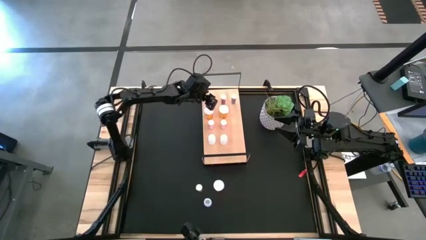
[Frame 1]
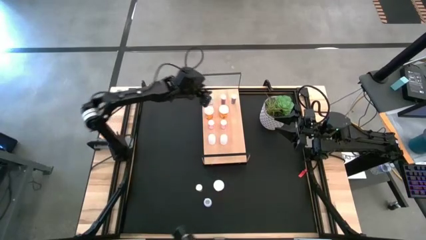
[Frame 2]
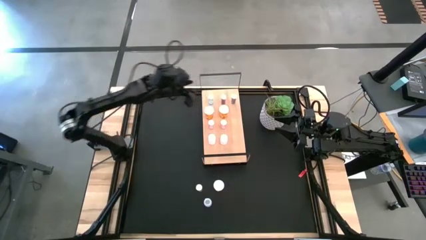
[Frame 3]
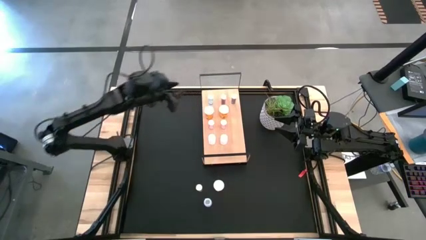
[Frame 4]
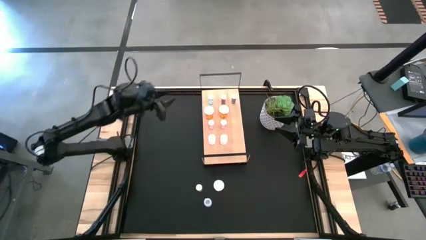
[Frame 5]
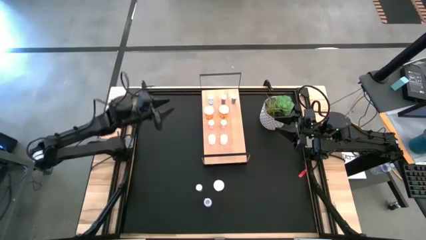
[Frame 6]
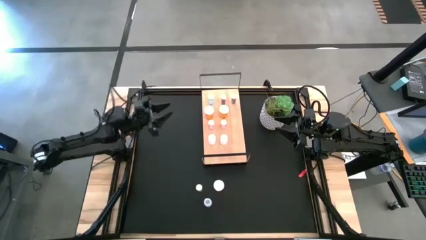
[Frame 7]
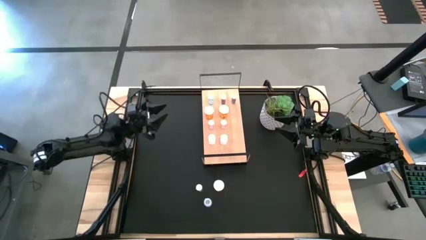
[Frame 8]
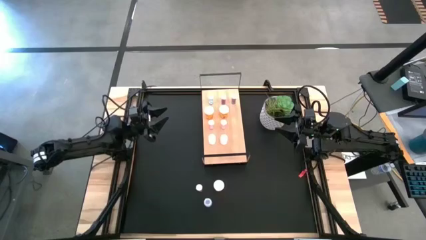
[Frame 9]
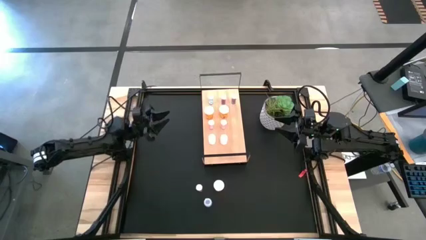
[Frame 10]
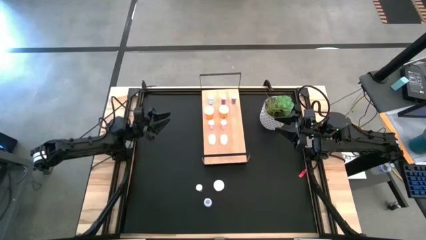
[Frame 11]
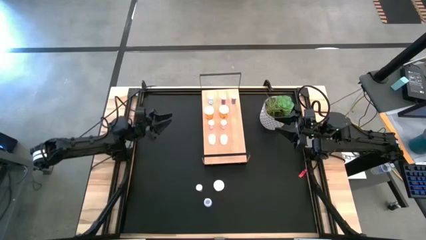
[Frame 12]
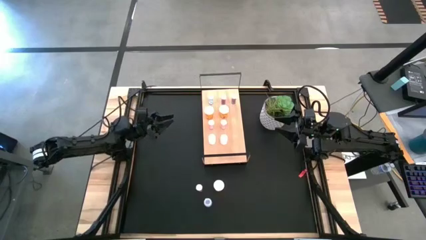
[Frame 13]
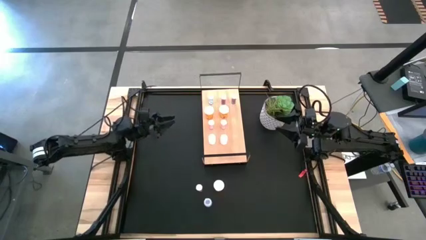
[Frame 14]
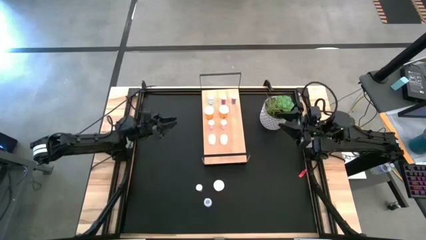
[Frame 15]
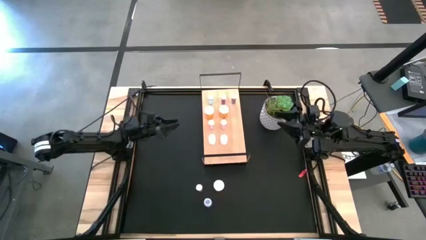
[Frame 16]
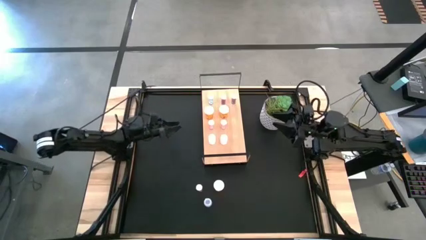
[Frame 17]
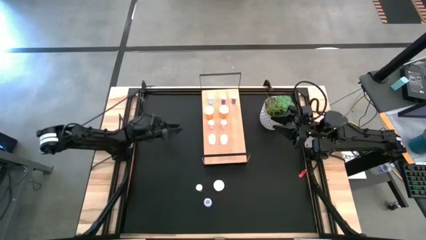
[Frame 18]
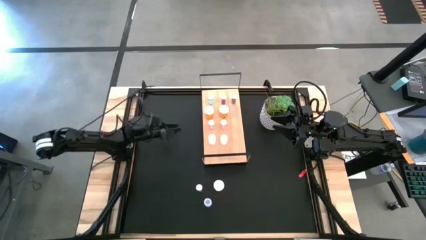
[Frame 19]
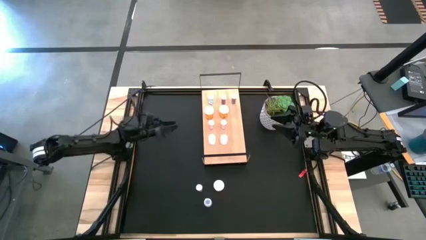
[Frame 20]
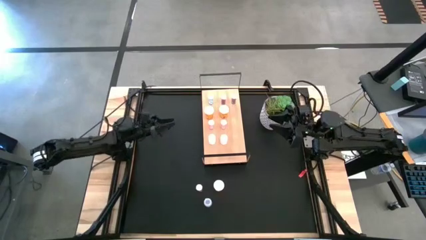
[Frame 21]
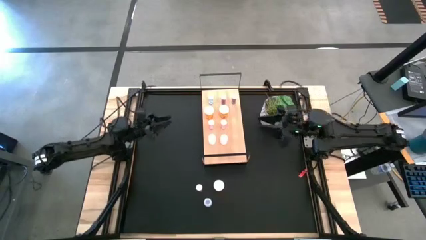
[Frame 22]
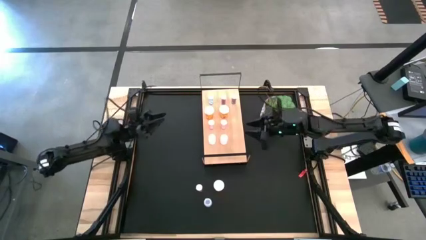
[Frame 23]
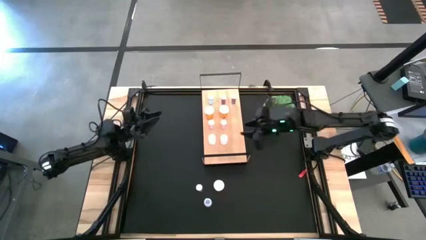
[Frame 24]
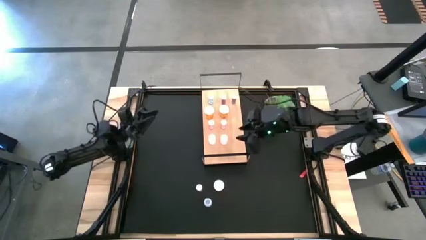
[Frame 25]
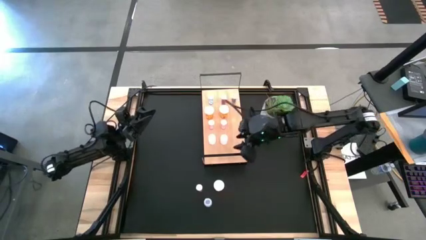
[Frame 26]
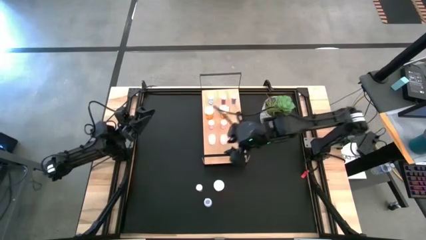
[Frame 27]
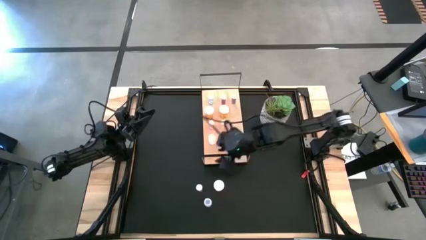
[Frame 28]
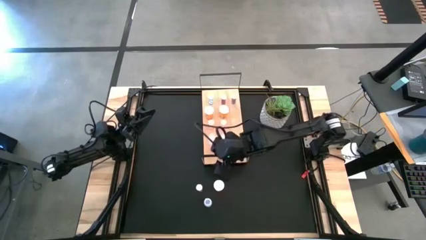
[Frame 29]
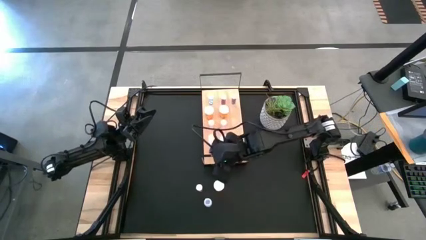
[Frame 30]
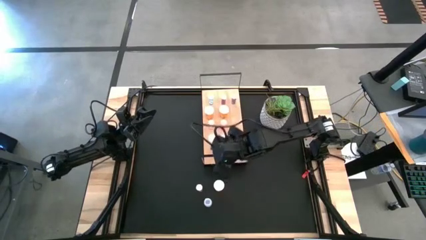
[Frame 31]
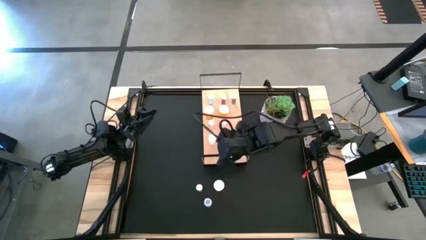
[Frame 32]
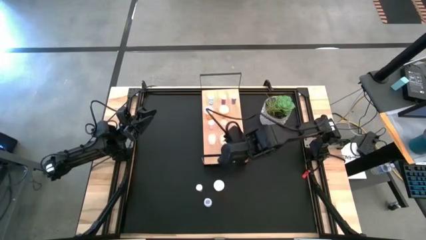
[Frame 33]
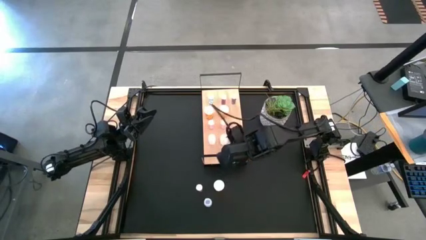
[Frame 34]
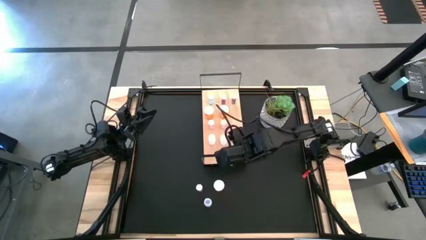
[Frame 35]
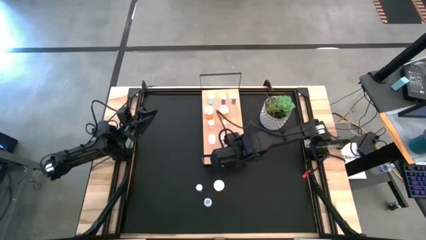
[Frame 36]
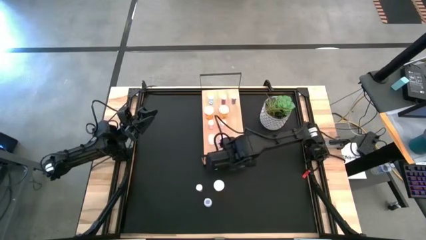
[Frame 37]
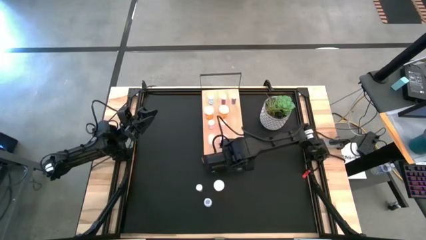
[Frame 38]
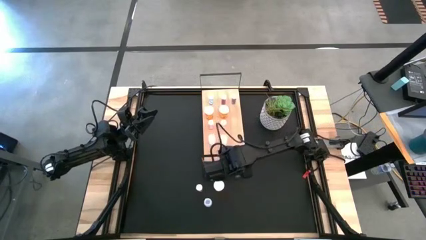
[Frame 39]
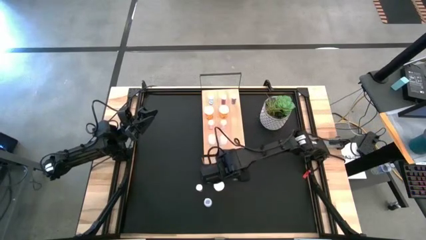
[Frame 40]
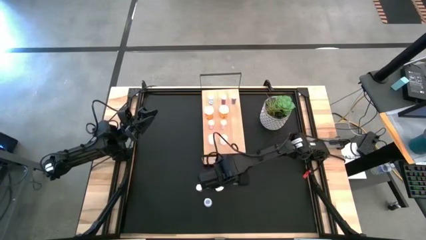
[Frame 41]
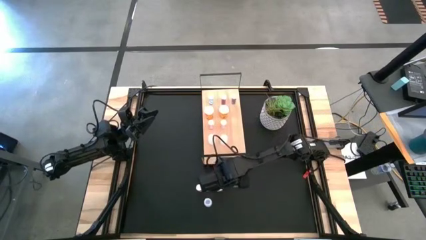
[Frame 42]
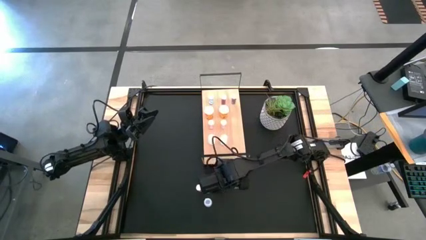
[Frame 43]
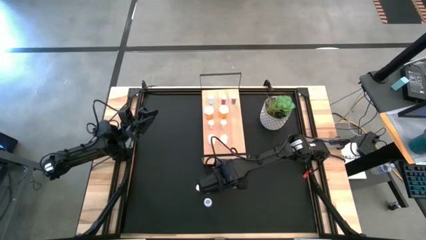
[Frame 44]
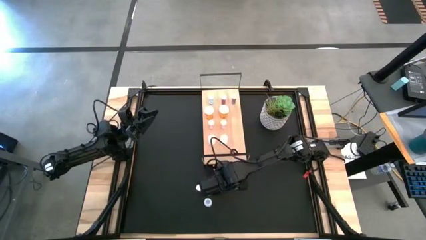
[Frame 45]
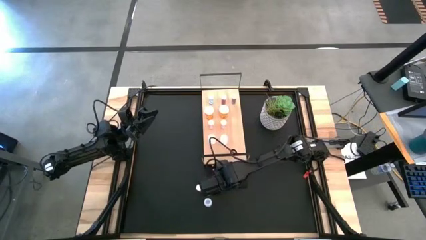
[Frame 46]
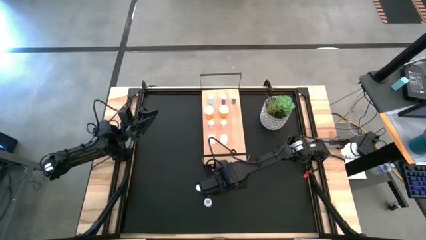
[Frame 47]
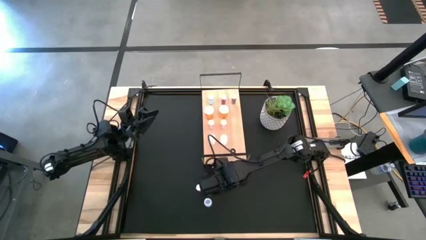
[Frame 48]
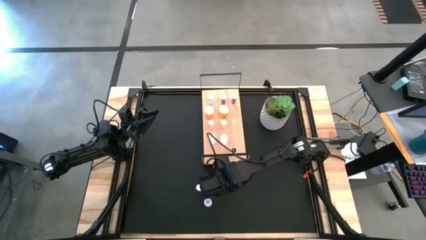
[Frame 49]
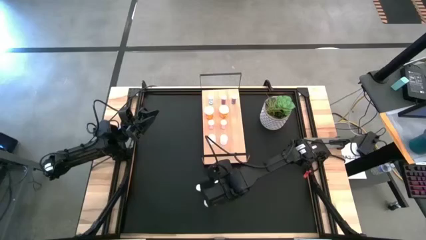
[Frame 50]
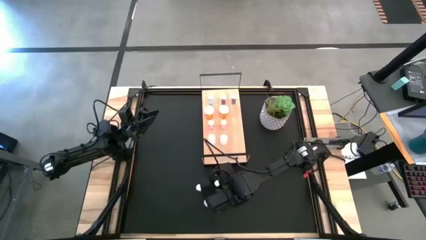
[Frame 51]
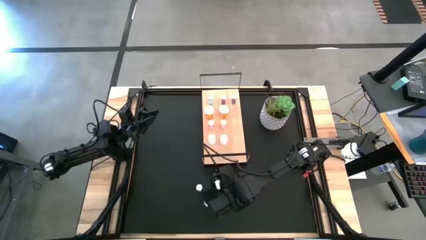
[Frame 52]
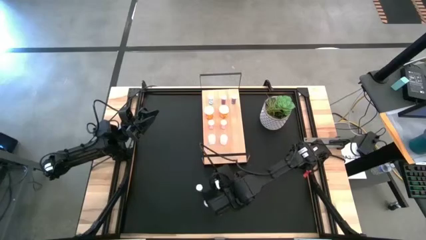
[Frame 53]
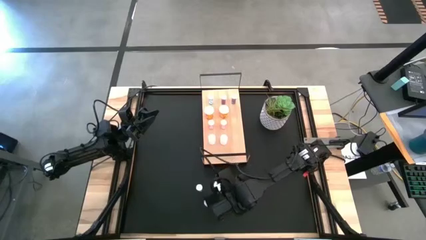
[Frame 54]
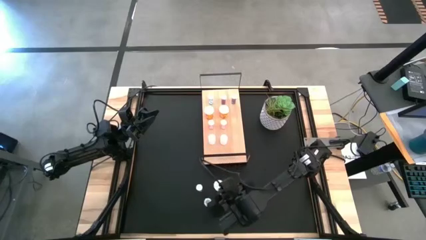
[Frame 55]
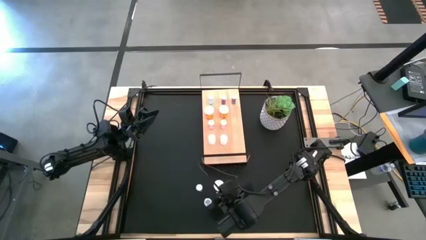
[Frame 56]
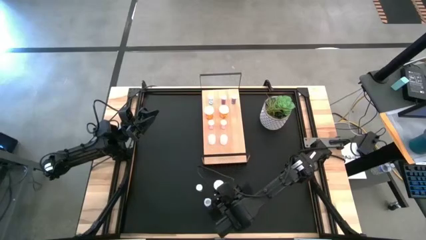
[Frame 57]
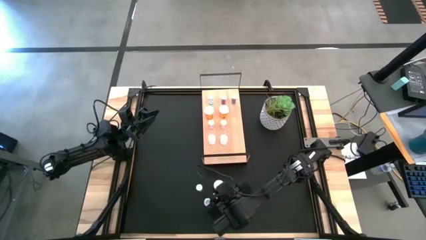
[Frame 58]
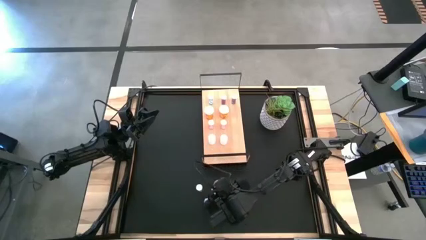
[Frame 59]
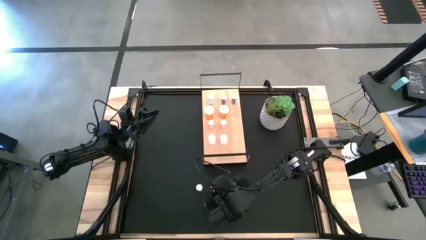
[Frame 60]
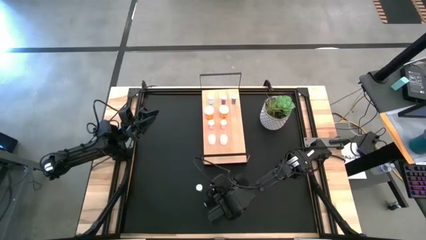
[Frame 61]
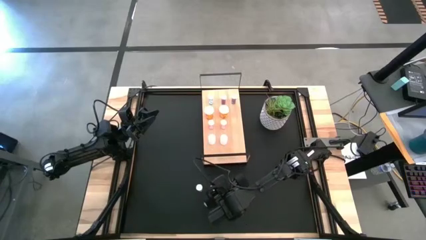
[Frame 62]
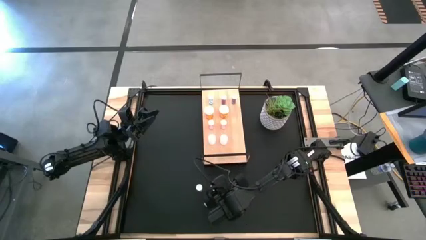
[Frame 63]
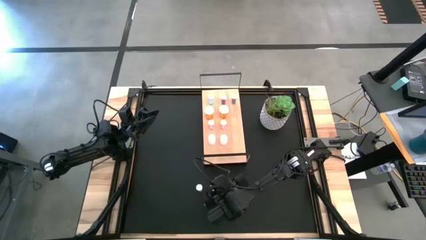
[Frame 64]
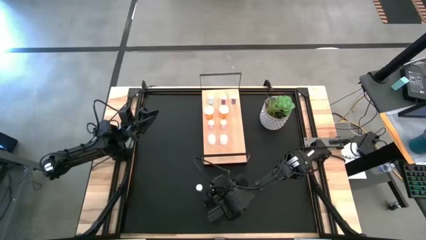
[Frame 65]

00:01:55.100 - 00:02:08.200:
Task: Pick and place medicine bottles onto shelf by color
Put the orange pill bottle on the shelf aligned with the orange pill bottle

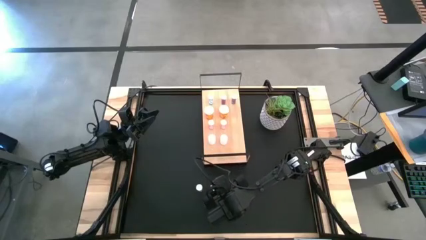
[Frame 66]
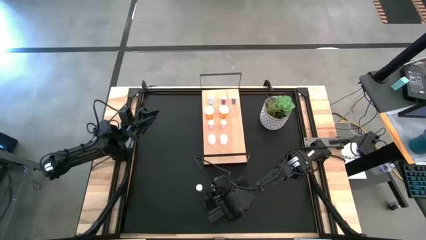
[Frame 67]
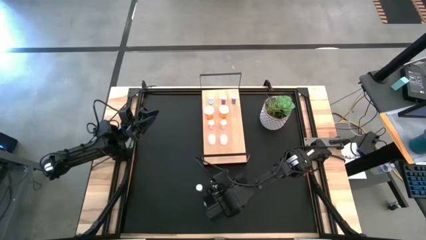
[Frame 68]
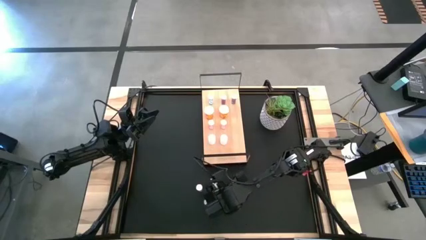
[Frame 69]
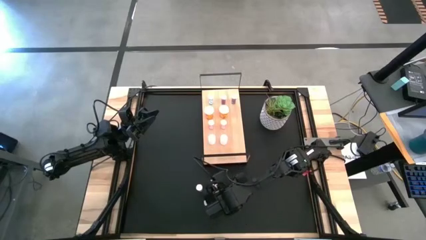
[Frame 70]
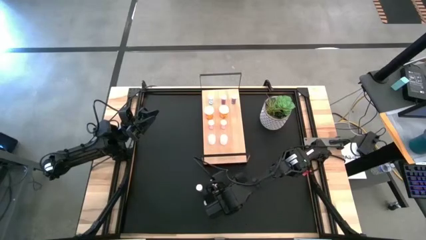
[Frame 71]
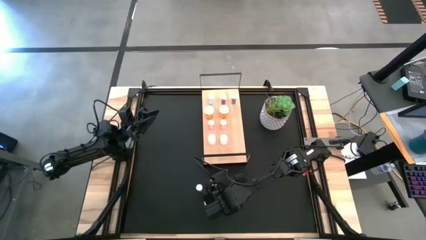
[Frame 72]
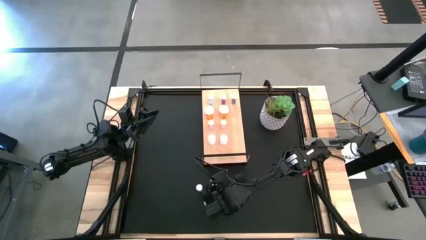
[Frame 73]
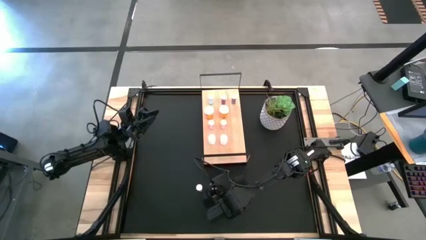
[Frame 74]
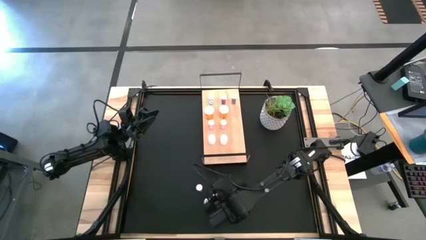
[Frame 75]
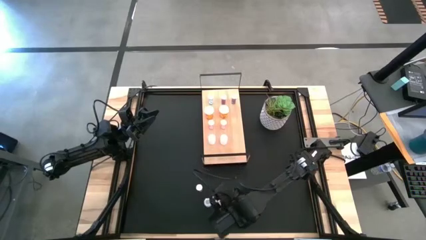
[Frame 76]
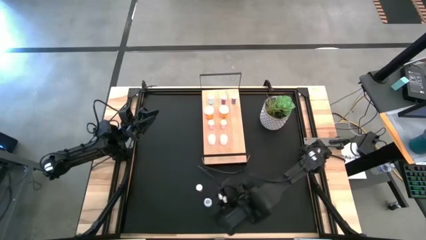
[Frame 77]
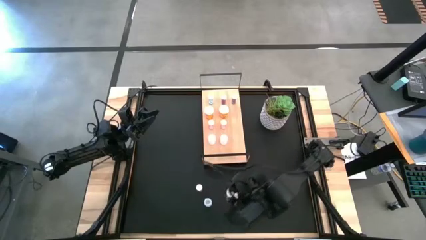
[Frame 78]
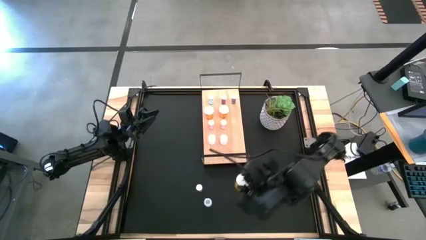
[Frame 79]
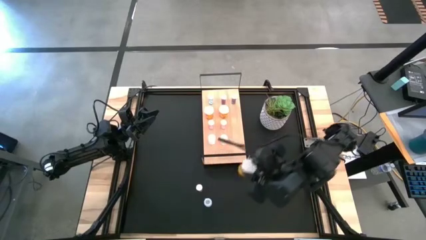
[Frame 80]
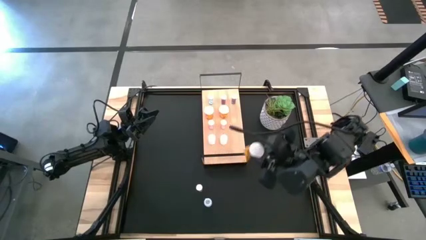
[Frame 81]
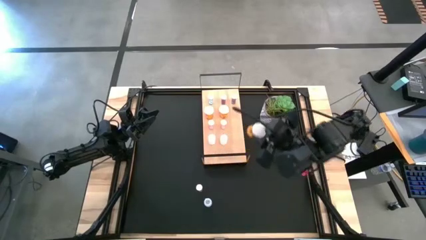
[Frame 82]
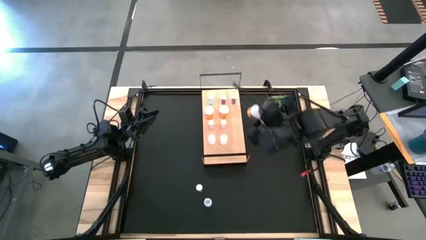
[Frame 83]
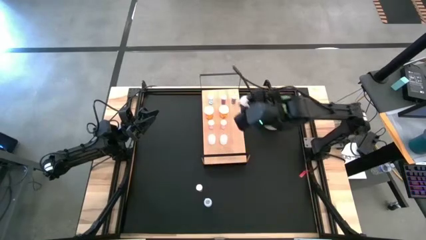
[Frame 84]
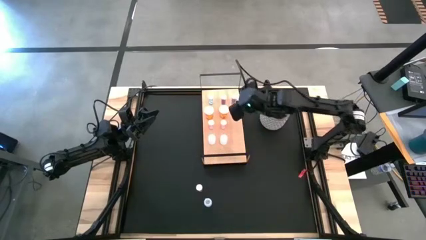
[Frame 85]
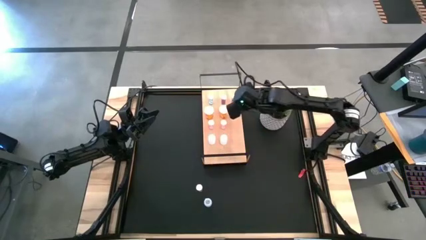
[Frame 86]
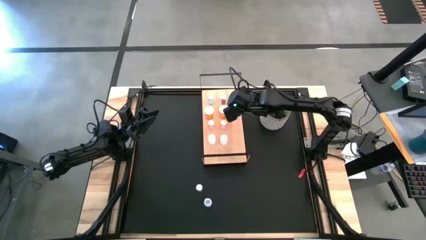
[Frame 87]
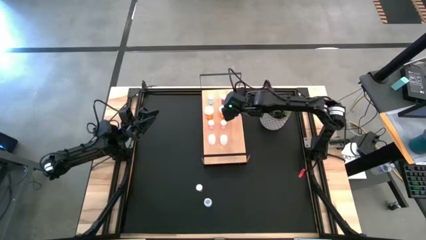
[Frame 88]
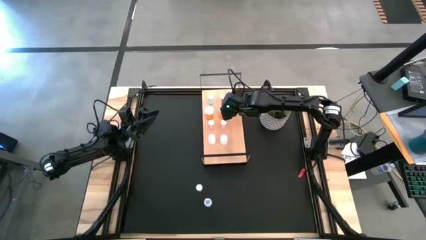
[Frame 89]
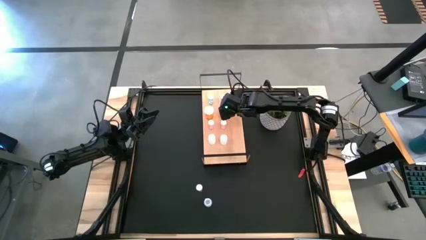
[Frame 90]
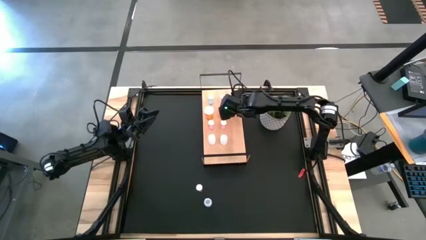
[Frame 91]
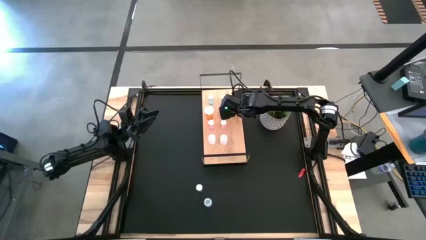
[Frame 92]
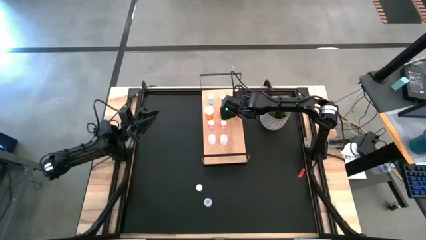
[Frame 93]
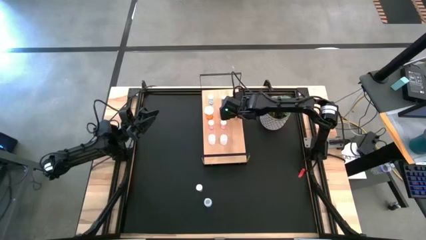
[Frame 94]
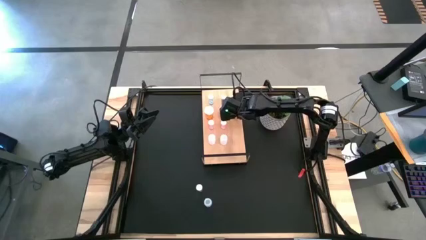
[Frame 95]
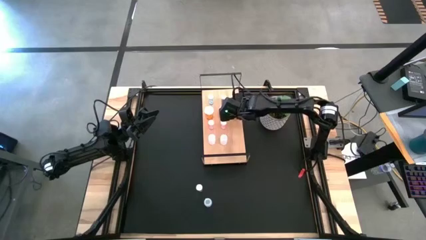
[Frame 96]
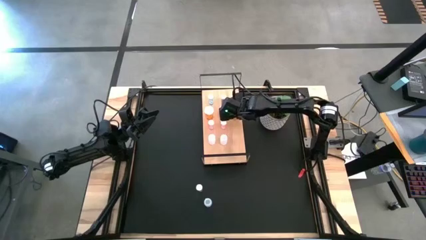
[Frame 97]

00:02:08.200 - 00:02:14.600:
Put the orange pill bottle on the shelf aligned with the orange pill bottle
